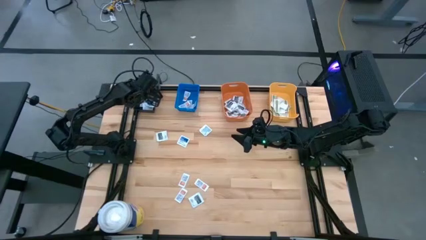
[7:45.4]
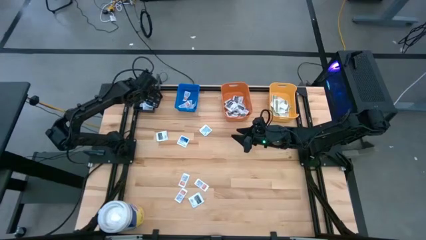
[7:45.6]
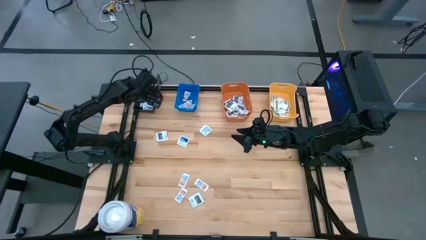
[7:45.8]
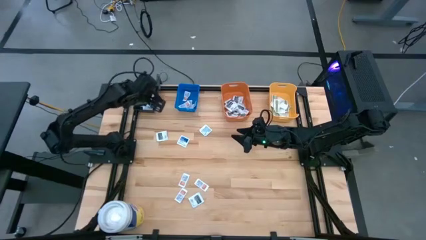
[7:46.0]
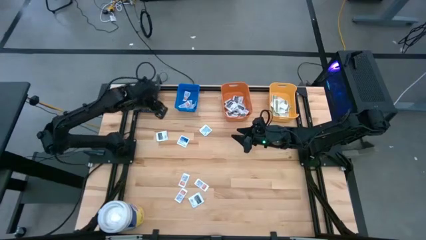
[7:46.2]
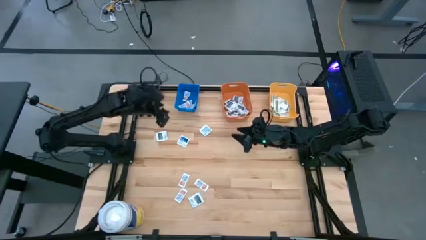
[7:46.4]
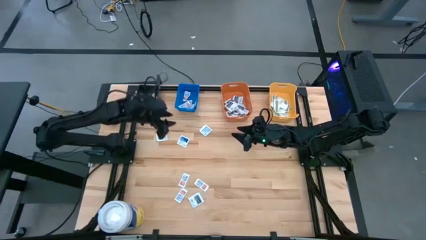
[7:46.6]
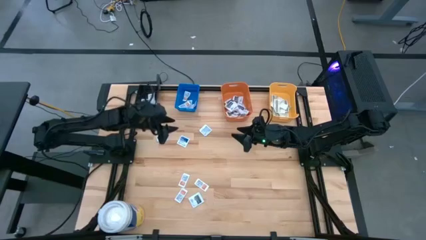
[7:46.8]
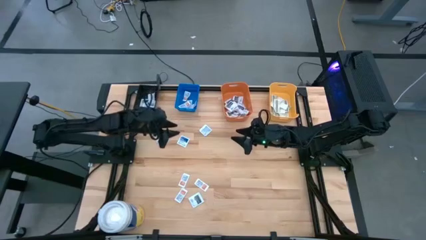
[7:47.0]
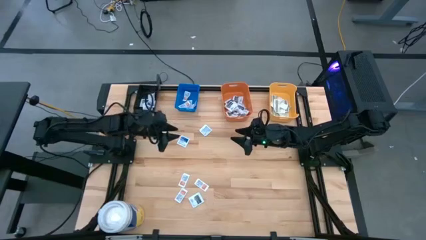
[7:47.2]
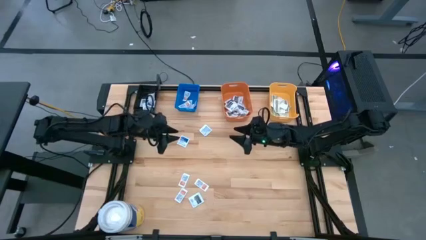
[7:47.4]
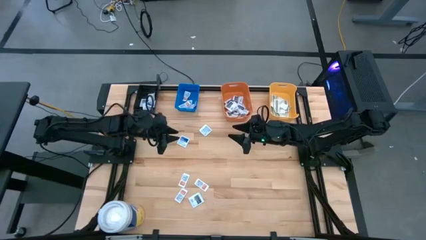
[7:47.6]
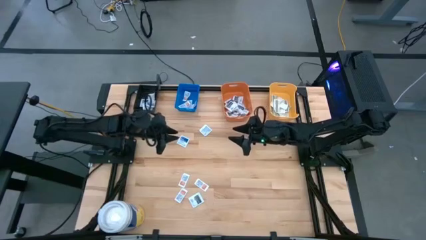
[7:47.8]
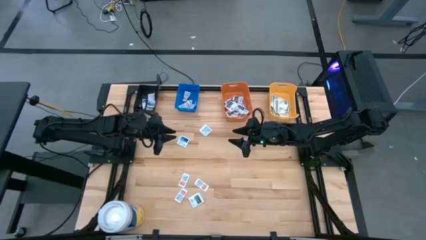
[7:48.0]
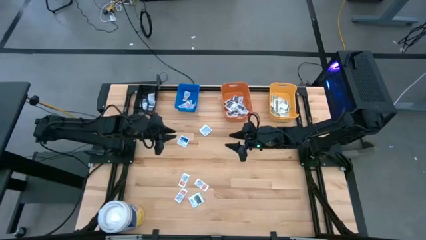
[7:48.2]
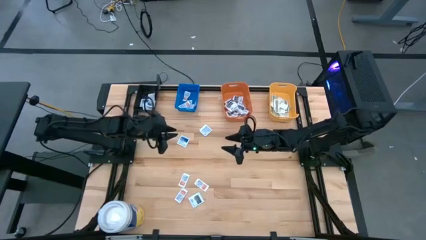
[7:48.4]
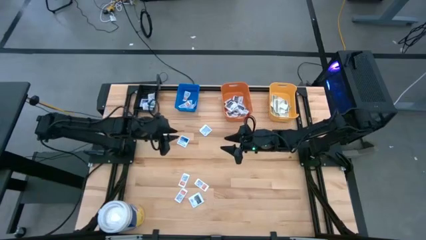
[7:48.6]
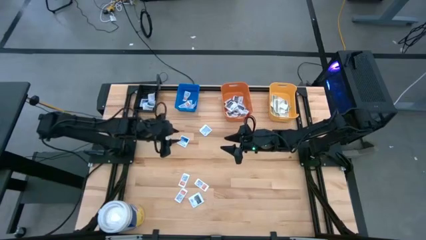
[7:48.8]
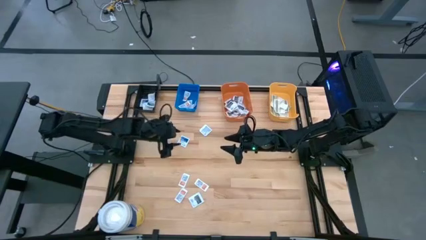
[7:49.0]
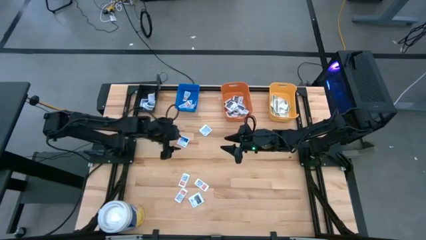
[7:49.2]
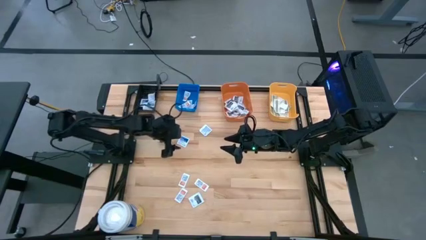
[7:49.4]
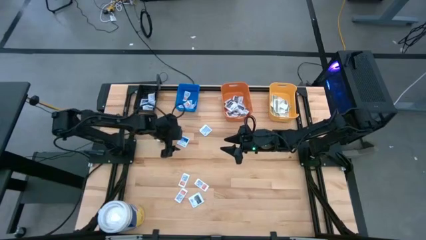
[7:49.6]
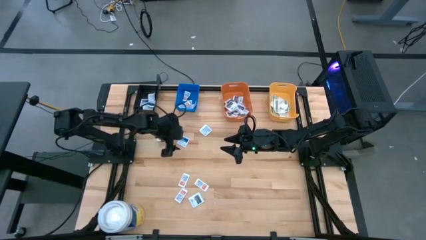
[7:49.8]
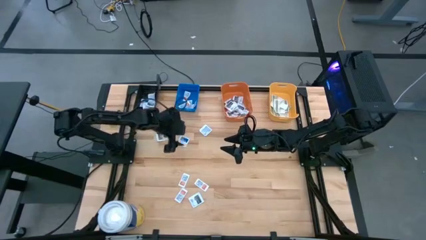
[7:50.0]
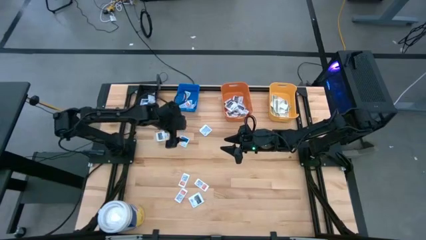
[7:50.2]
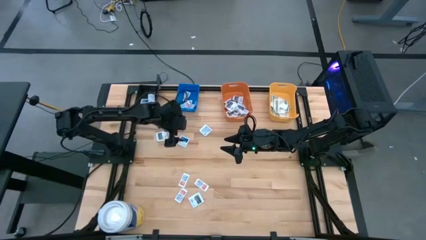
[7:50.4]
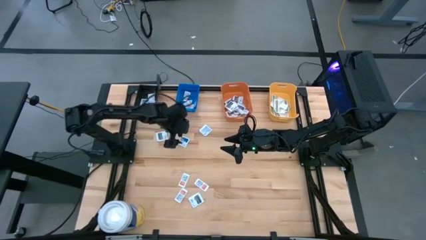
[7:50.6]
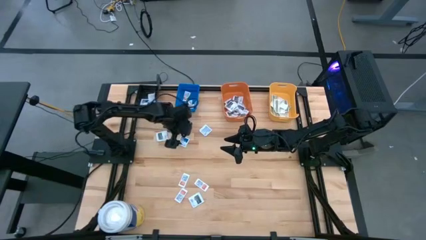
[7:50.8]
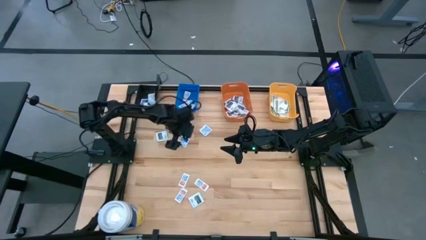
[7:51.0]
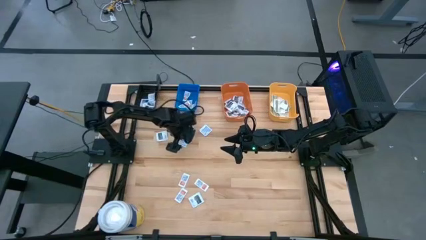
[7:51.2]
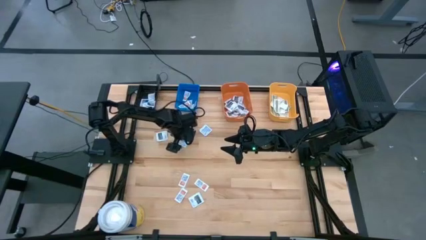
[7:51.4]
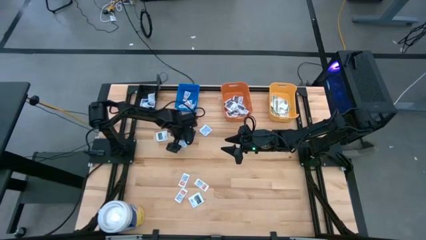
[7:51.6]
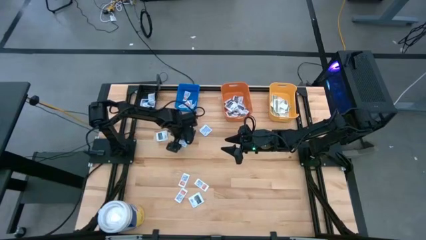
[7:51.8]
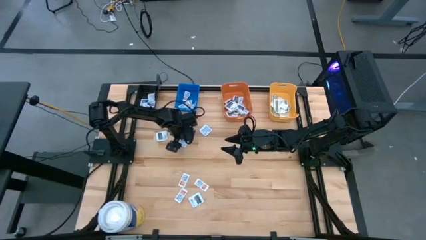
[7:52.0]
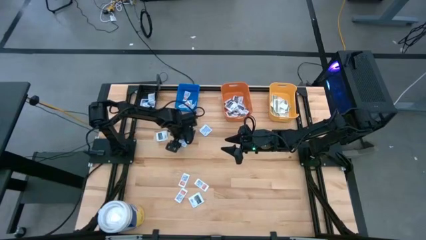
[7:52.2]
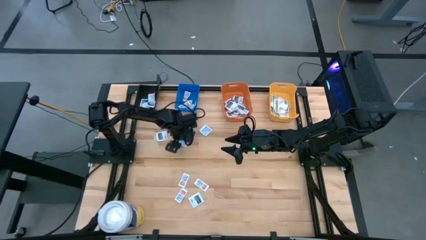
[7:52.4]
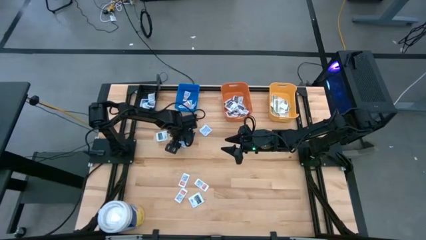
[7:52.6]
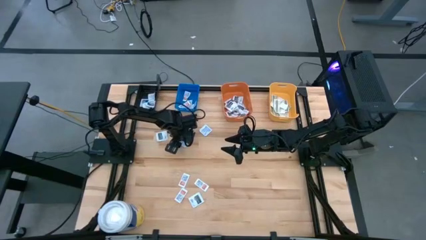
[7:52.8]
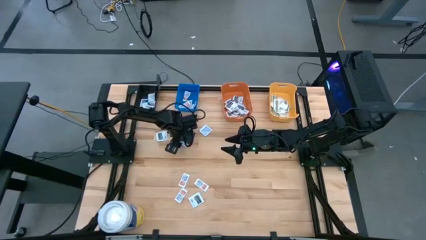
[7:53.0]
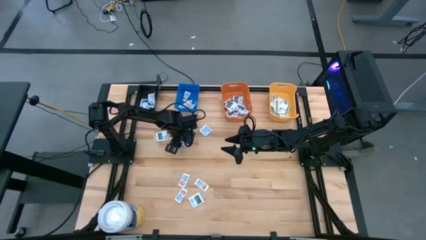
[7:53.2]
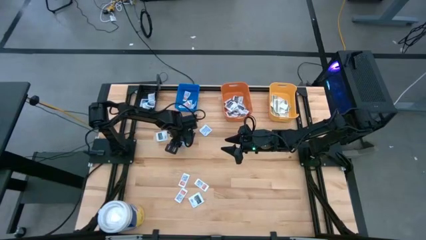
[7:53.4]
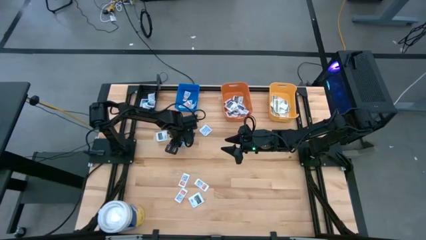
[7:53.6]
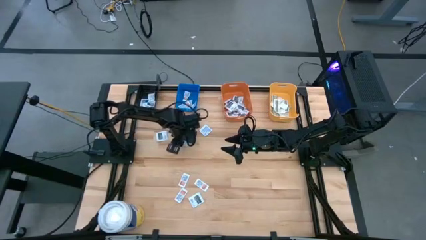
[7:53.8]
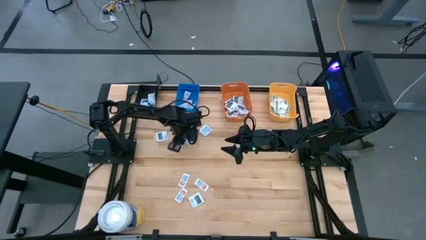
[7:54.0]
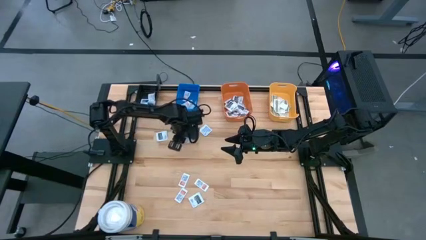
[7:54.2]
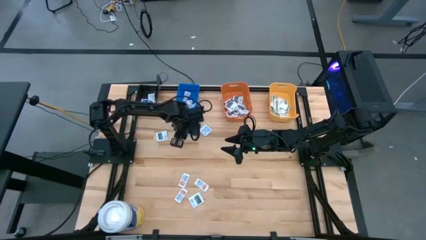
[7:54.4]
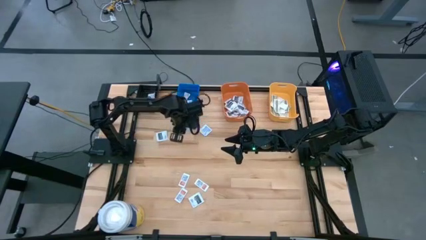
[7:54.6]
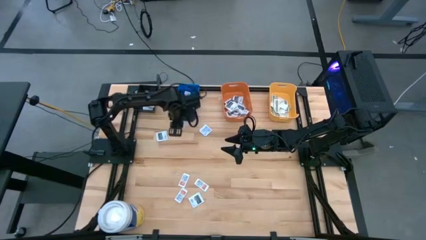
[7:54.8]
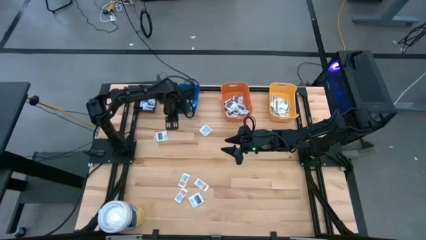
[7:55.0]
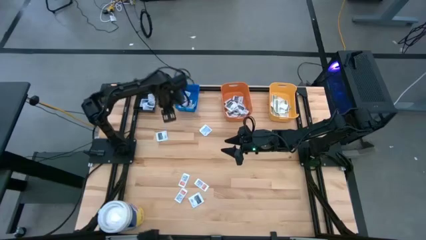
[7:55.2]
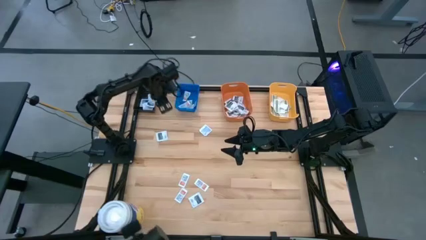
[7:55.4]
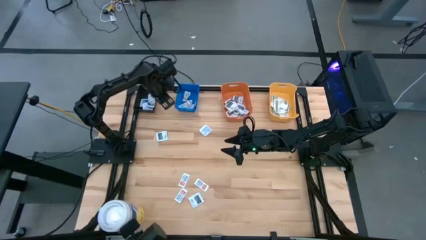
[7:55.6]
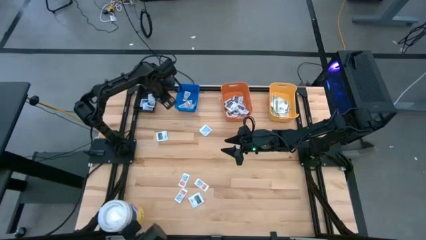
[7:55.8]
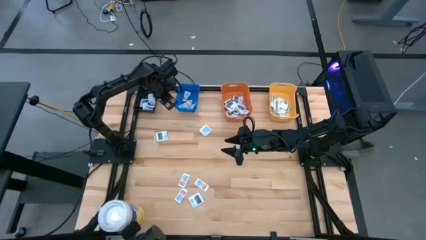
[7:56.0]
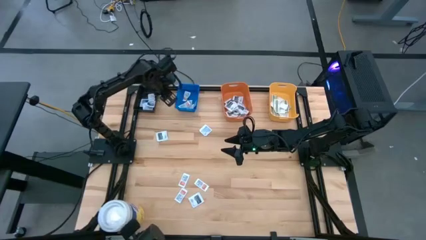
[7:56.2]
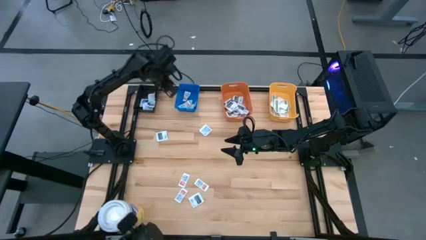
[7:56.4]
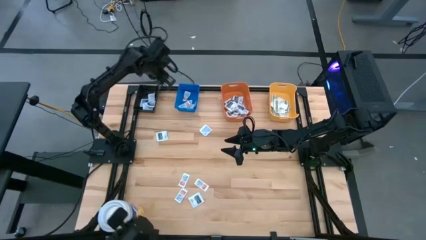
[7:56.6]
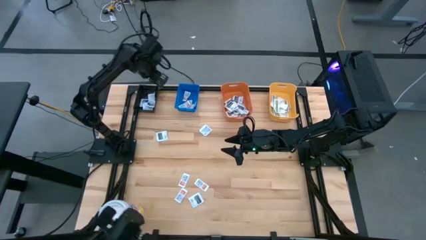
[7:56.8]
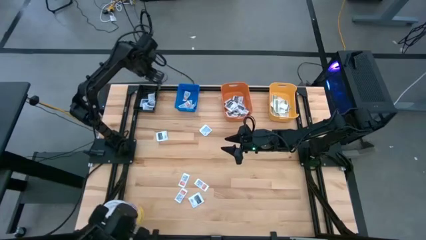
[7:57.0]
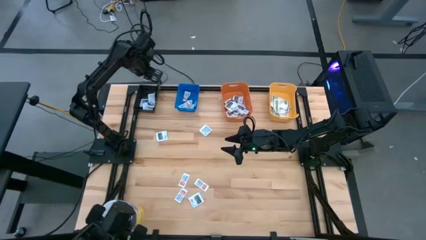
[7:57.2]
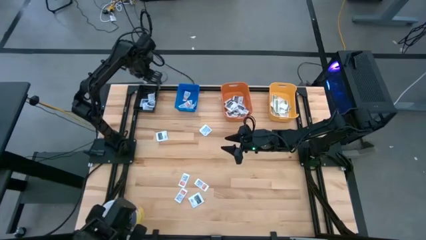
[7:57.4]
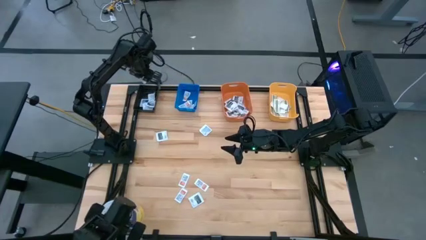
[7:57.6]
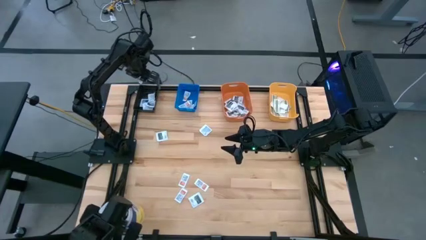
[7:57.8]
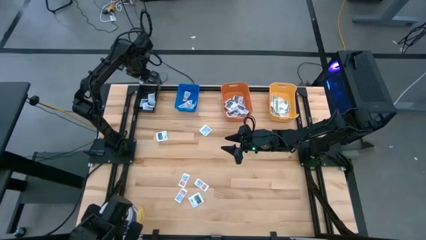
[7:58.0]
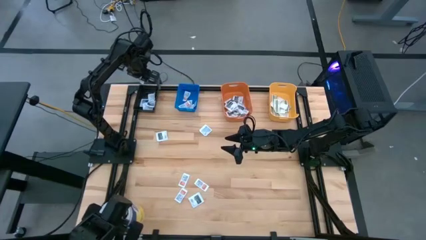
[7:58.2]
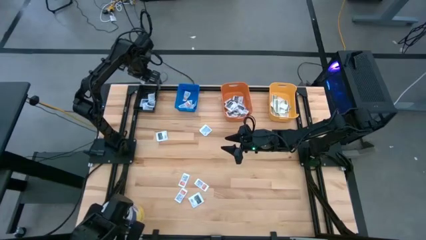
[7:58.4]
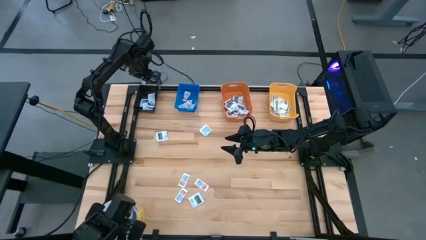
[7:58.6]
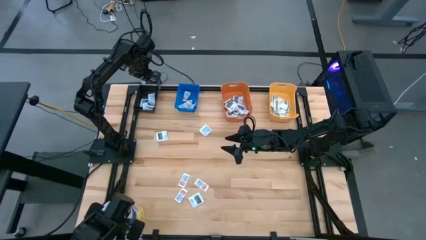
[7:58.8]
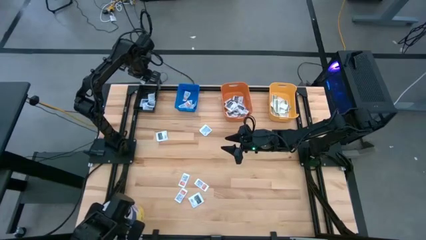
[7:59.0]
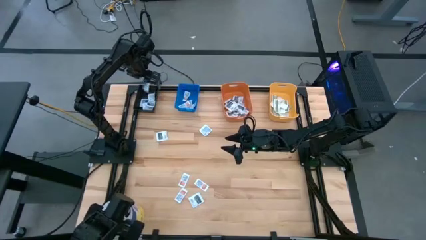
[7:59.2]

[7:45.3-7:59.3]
Task: Pick & Place First Aid Supplies
Put the alcohol pad into the black bin

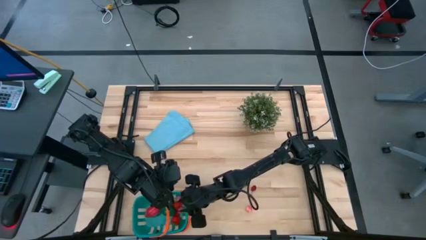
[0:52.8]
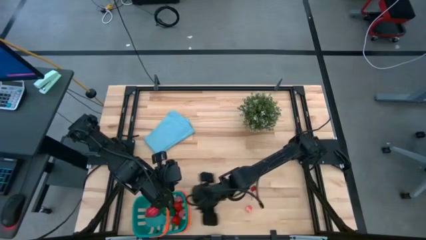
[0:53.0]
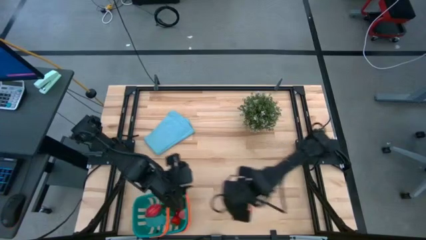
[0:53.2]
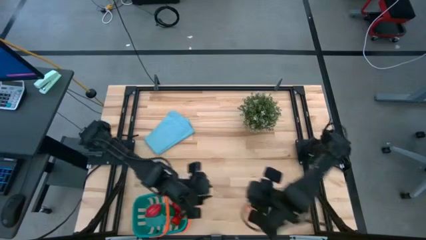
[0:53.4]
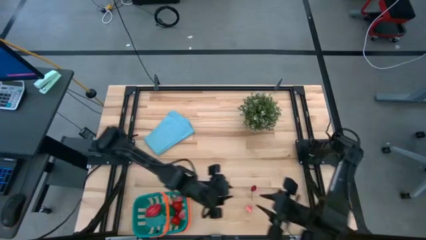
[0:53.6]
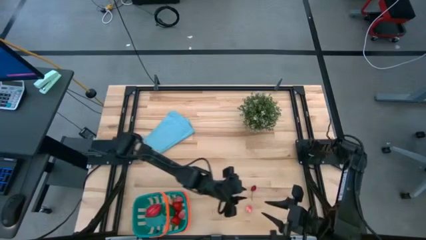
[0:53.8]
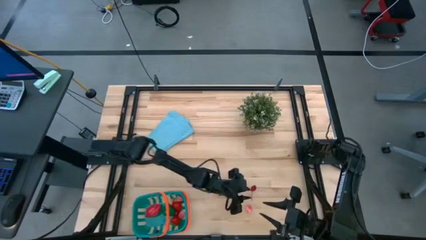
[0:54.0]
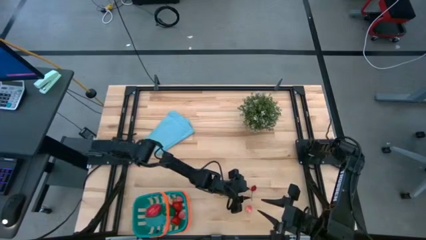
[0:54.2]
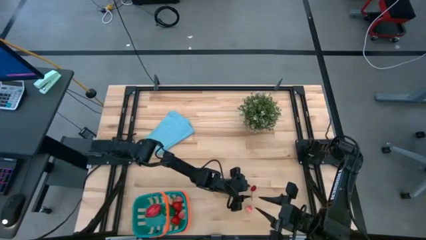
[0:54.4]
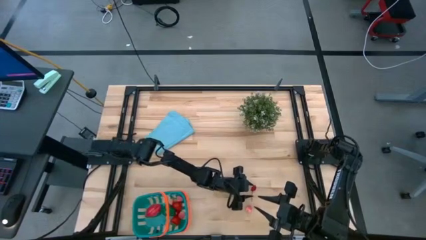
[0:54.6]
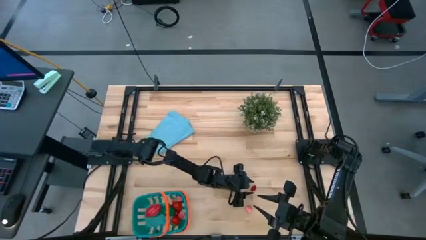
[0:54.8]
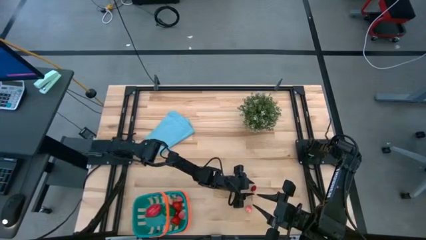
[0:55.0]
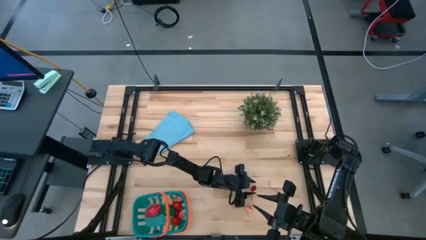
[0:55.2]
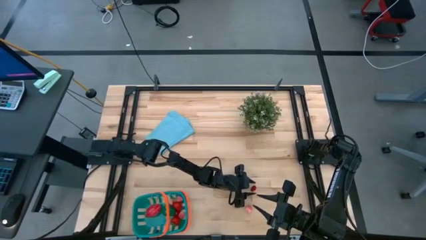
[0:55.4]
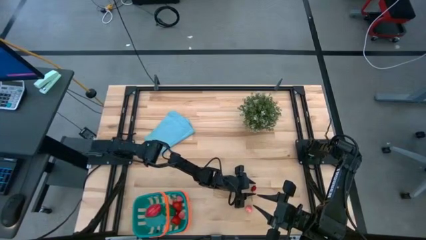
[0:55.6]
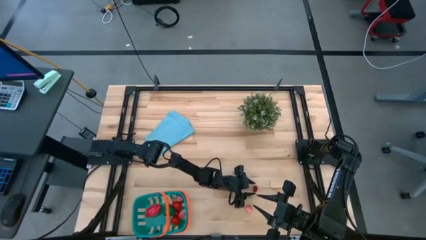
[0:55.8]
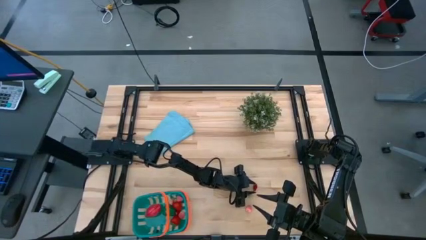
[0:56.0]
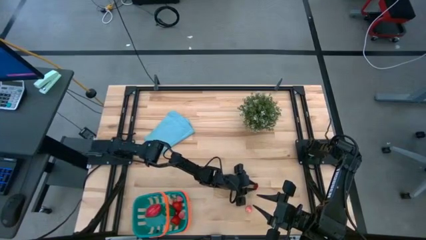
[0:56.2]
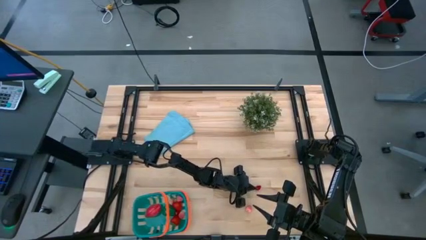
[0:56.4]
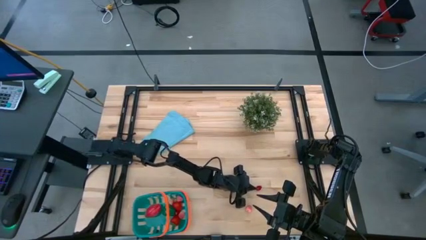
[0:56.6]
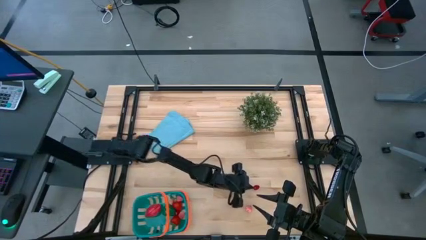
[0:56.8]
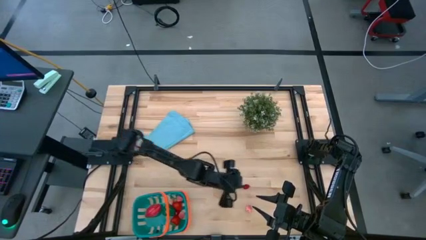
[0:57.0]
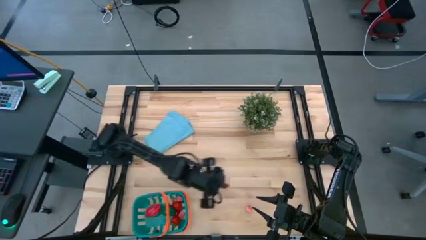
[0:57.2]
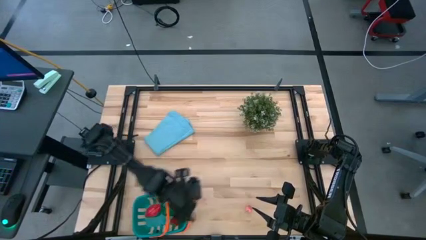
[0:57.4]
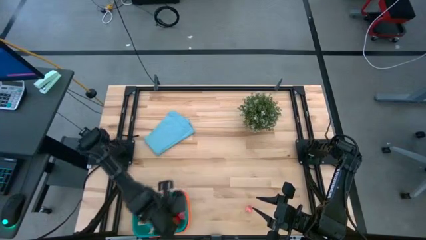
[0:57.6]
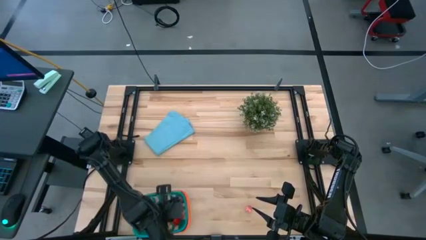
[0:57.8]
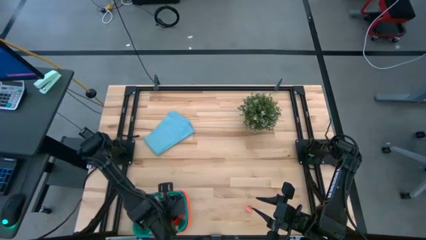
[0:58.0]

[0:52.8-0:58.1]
Task: Pick and placing Produce into tupperware
Put the red cherry into the blue basket
